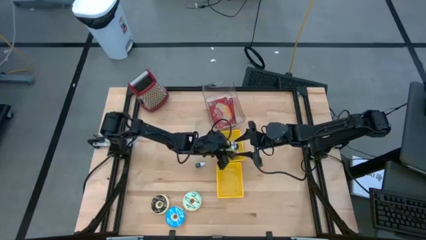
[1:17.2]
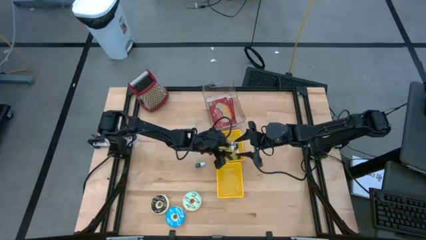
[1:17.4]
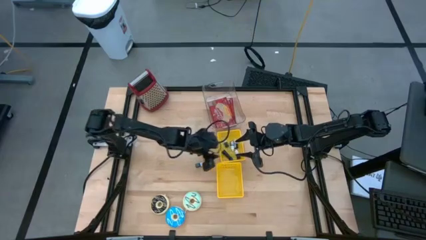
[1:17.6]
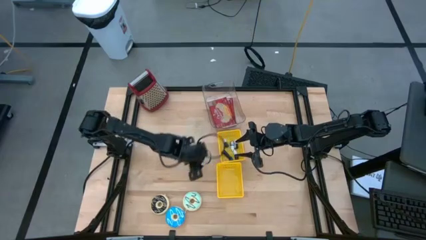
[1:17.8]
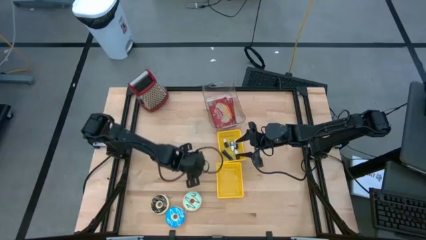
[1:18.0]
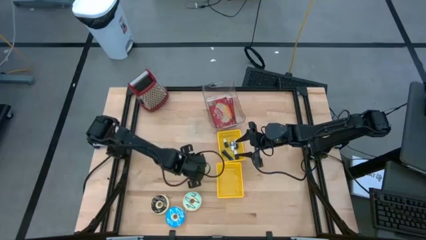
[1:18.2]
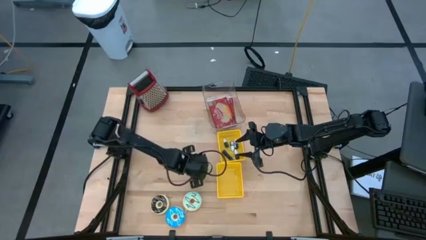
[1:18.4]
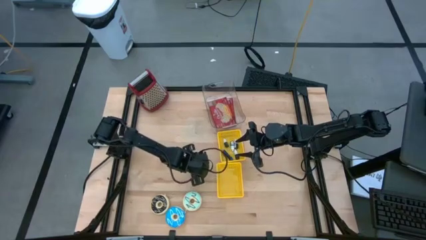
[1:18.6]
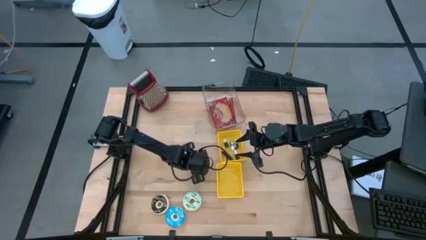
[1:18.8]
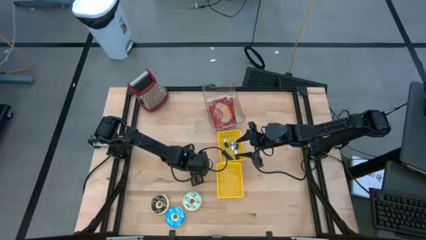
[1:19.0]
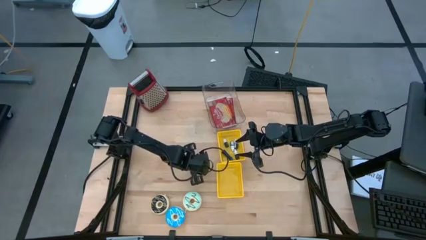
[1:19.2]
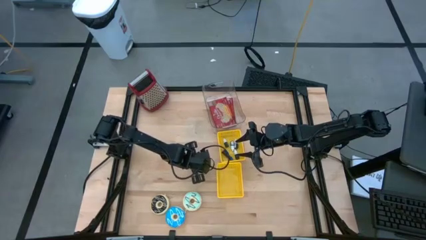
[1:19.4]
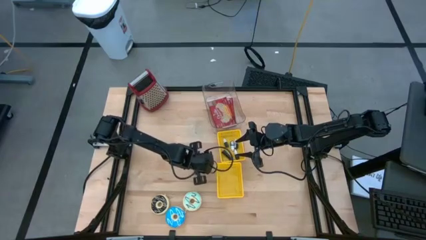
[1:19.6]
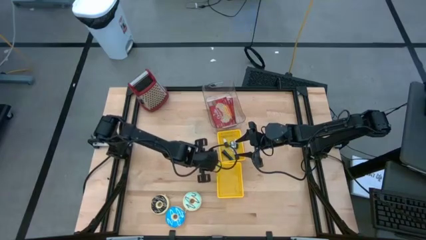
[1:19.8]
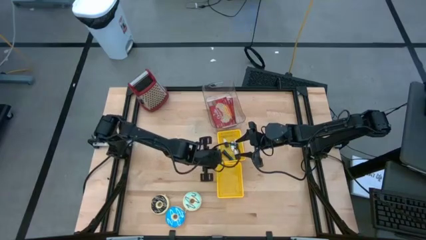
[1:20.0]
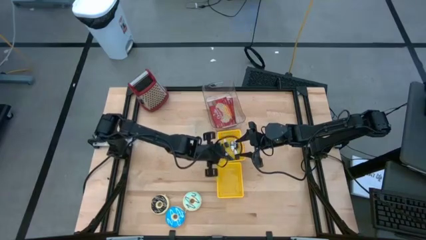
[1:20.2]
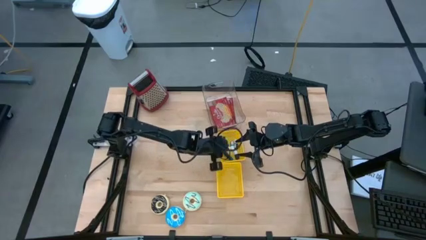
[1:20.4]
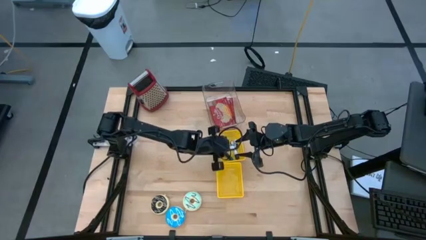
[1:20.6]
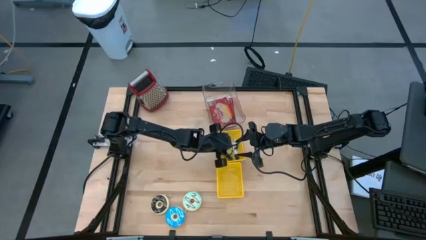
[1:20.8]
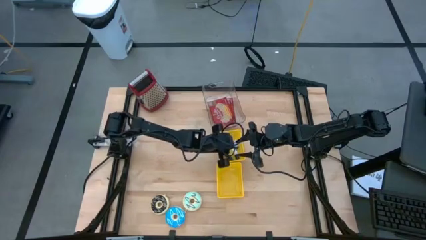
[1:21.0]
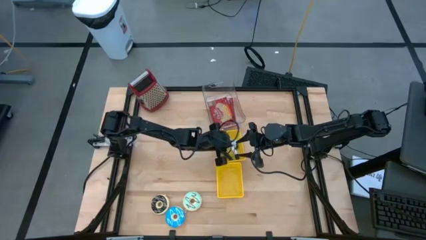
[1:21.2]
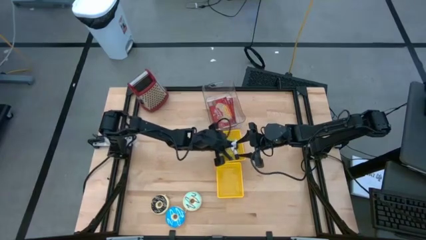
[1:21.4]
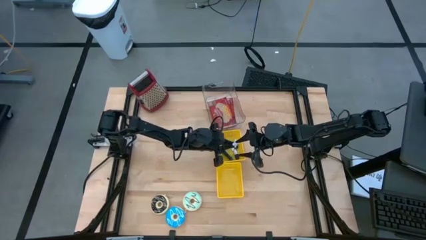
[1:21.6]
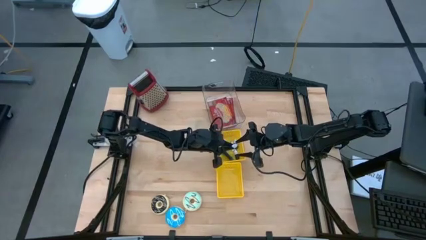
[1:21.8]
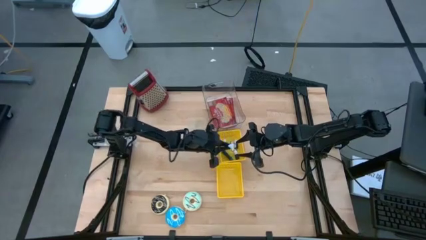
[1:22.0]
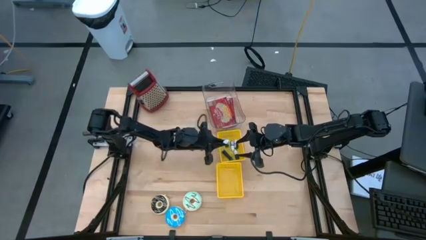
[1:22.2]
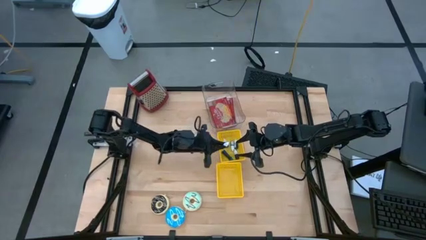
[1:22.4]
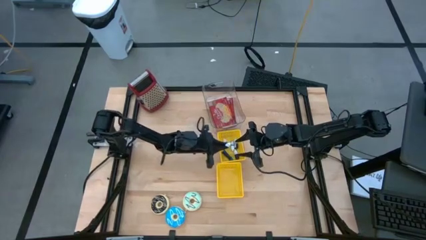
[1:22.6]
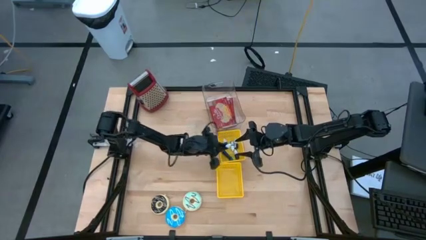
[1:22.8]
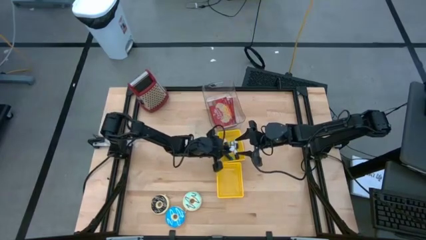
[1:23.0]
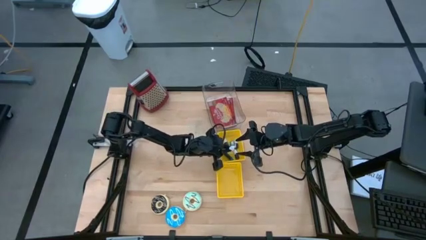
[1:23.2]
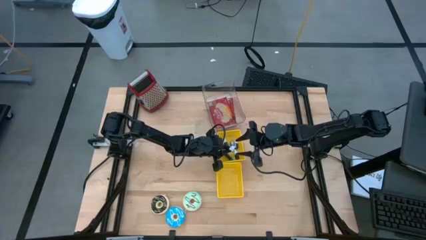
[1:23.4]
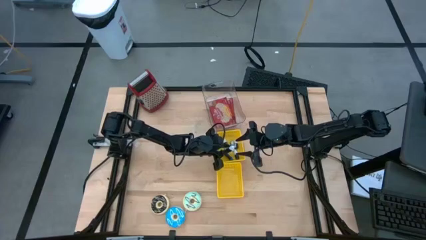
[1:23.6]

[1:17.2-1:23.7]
Put the black food coloring bottle into the top yellow bin

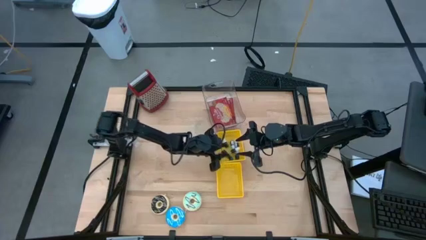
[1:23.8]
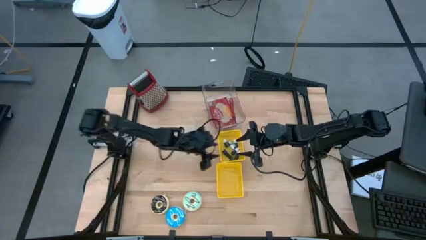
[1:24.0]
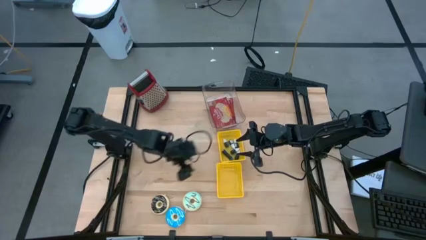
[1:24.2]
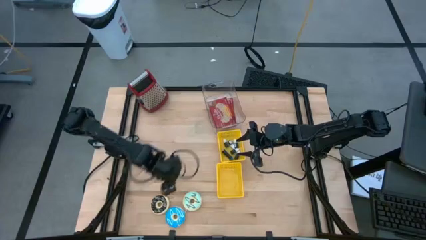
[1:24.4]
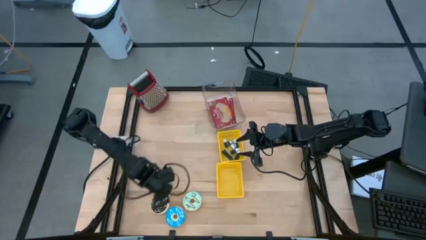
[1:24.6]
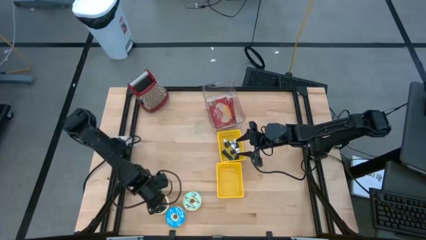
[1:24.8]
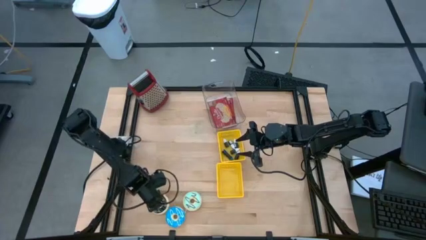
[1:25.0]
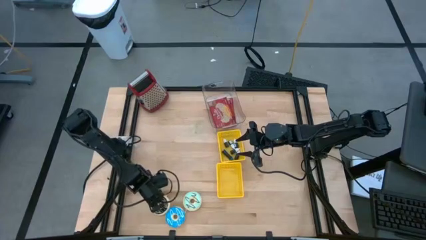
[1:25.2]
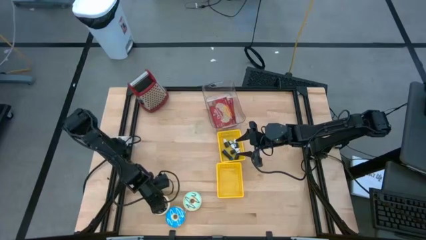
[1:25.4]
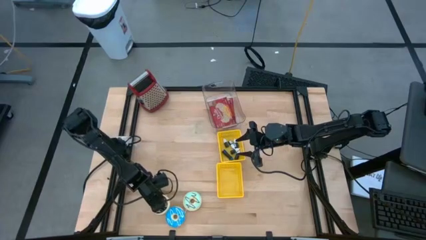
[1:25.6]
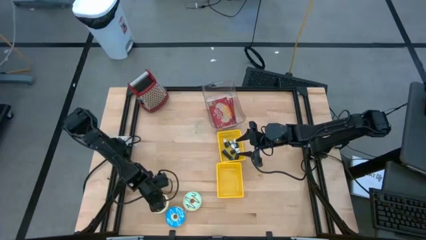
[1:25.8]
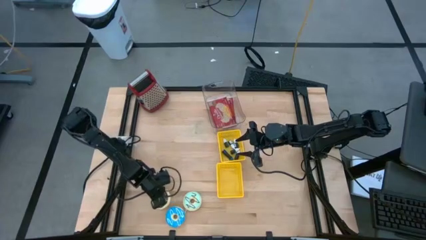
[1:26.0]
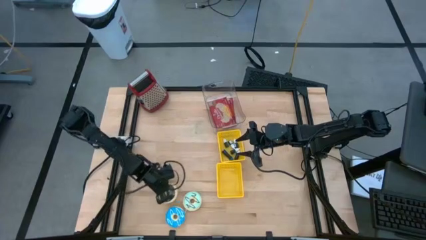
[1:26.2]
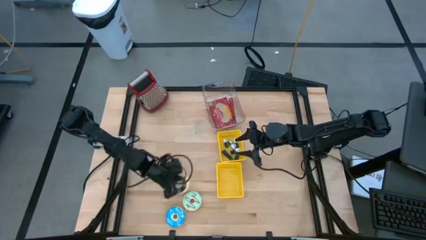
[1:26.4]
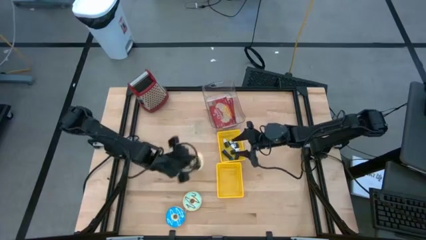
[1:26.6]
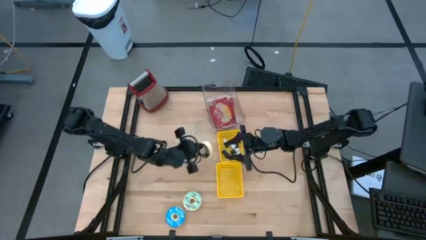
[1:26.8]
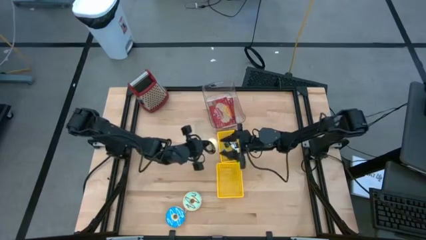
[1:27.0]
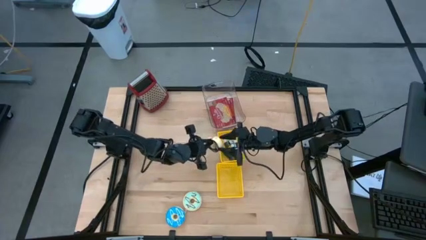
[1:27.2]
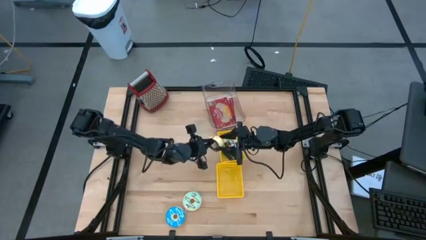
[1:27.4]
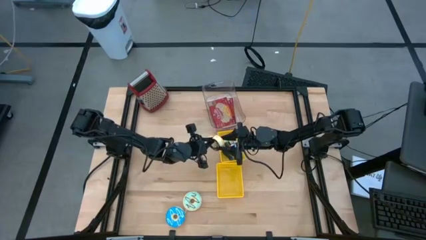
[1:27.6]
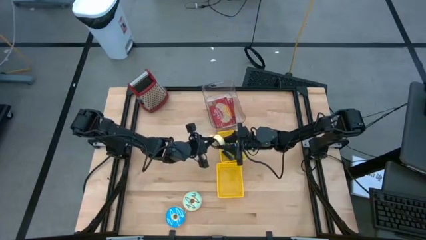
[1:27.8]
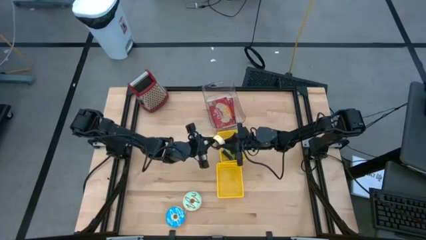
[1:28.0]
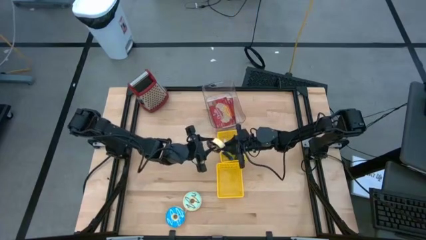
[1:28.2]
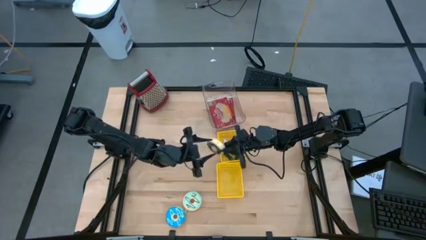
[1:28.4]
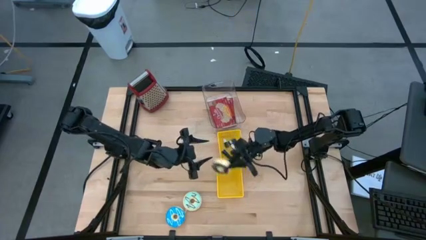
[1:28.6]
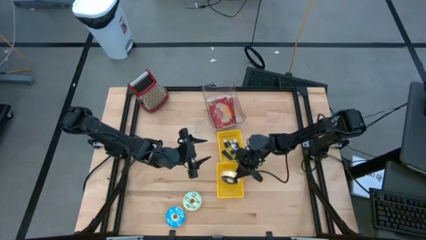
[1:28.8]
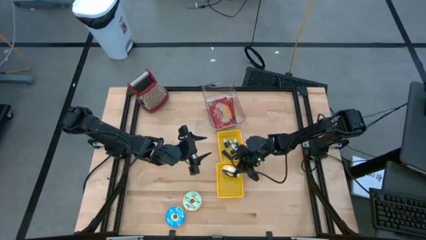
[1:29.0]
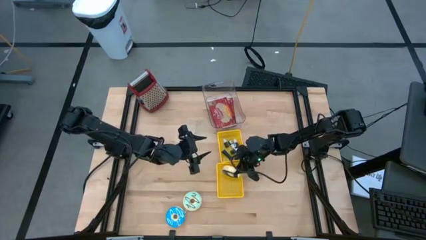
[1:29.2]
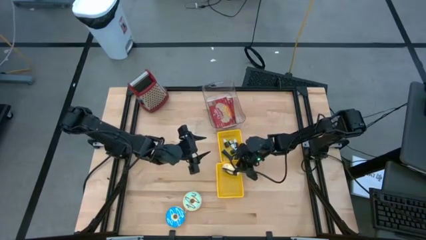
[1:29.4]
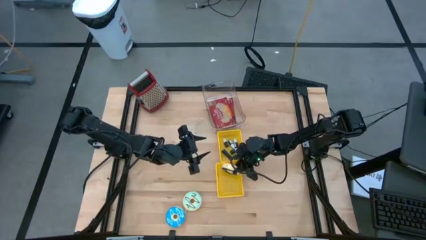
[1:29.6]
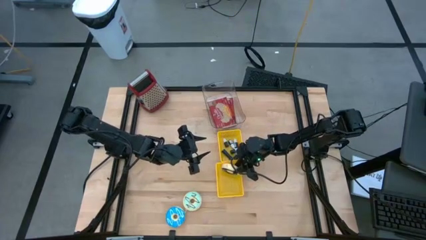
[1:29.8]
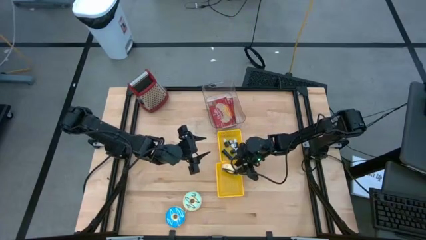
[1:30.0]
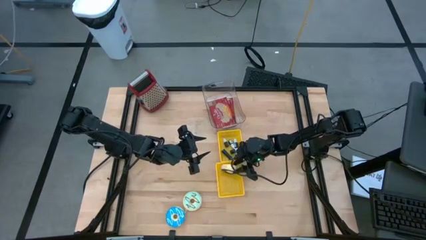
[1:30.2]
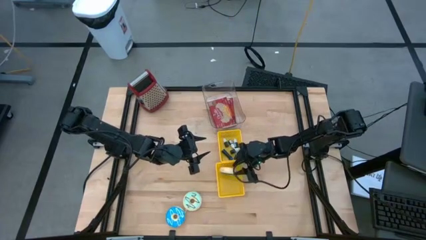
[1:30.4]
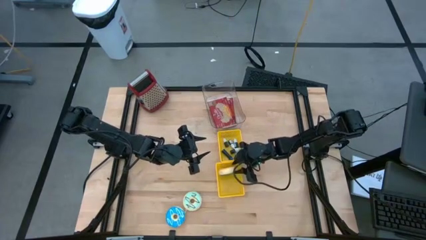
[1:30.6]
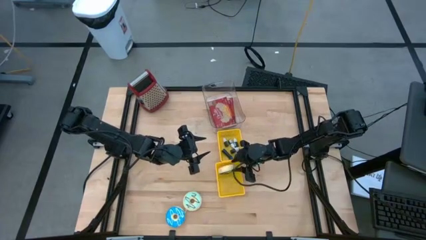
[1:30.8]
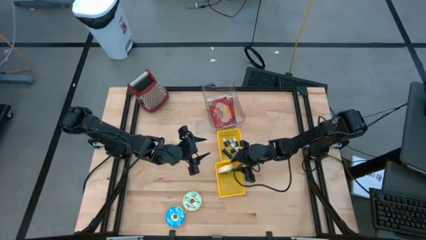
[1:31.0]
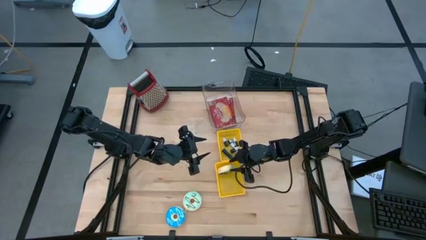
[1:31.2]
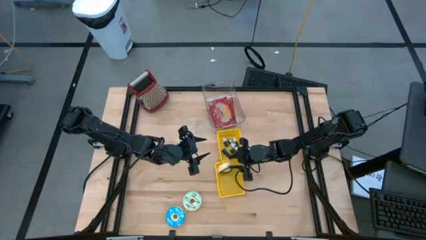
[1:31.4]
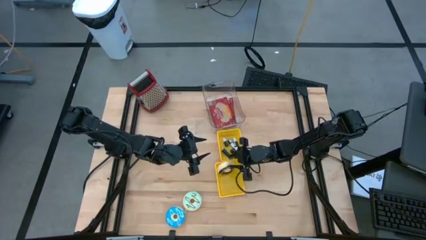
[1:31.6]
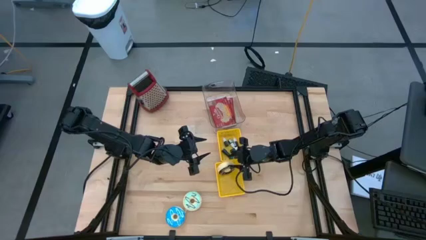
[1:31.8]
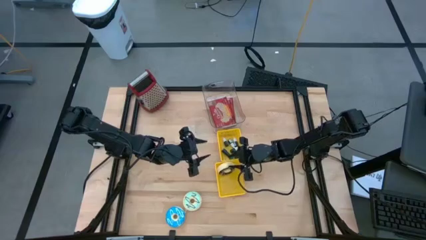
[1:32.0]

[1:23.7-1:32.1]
Put the black doughnut into the bottom yellow bin
